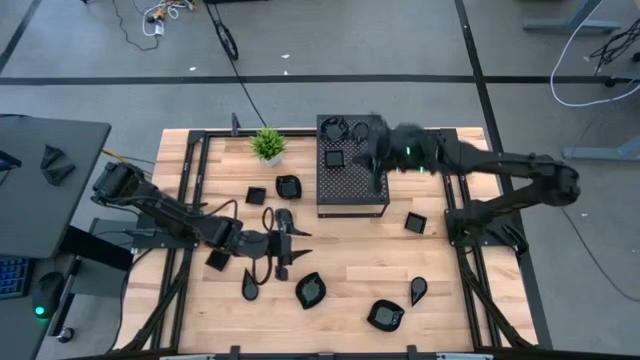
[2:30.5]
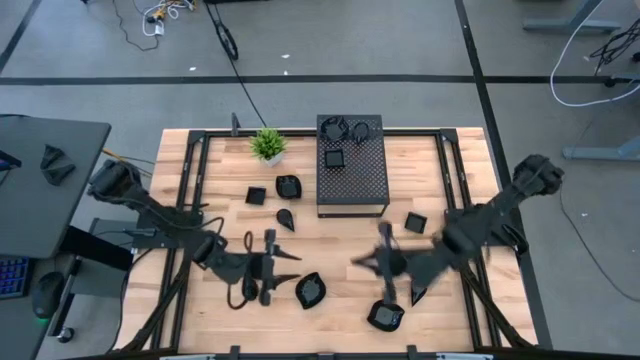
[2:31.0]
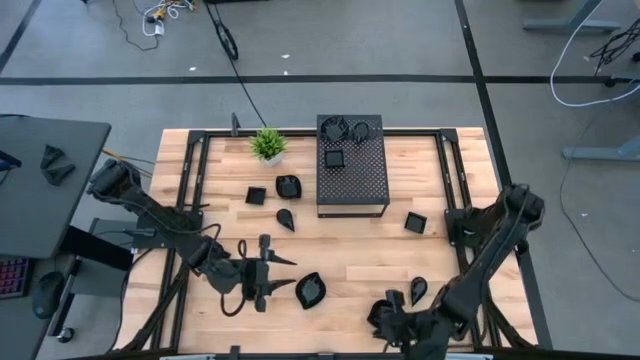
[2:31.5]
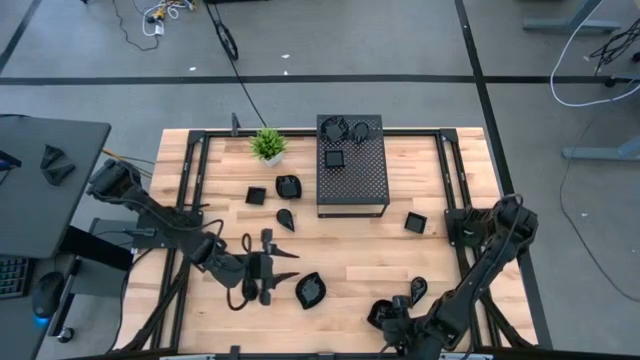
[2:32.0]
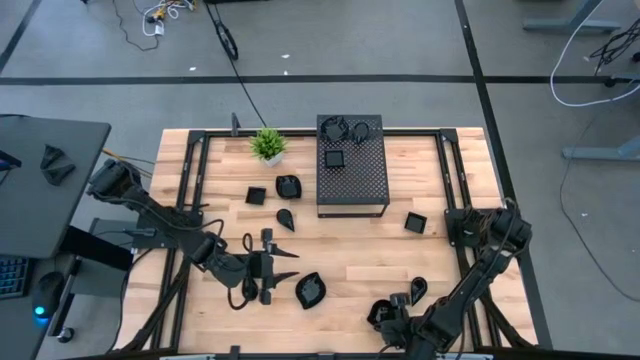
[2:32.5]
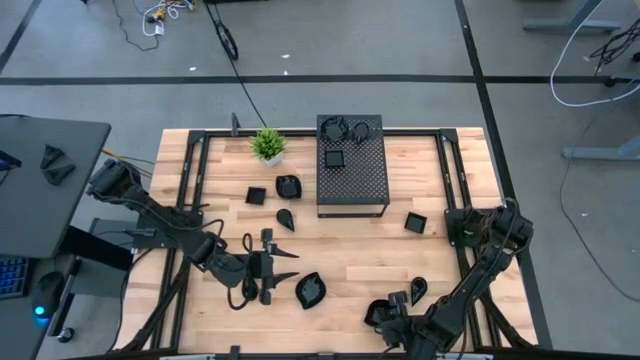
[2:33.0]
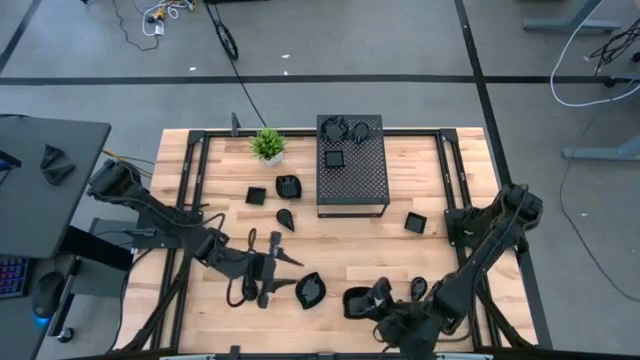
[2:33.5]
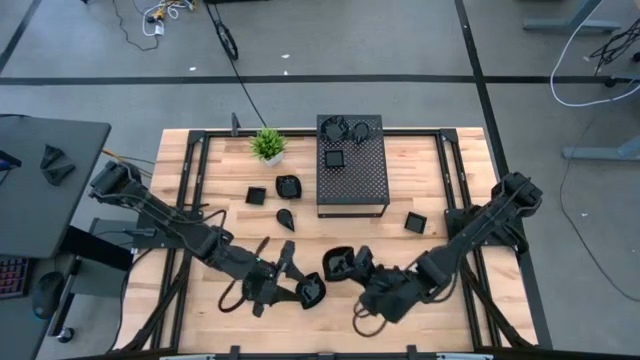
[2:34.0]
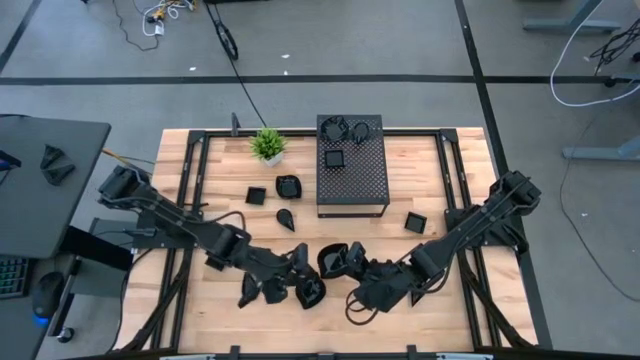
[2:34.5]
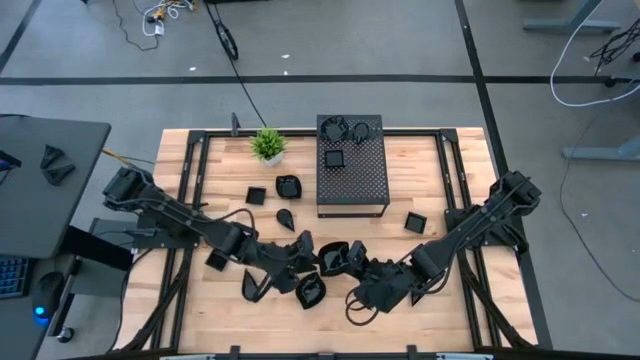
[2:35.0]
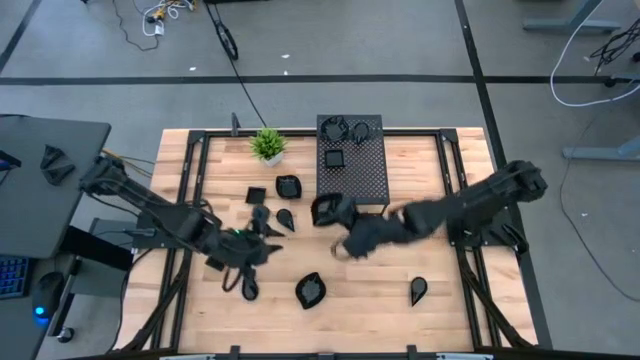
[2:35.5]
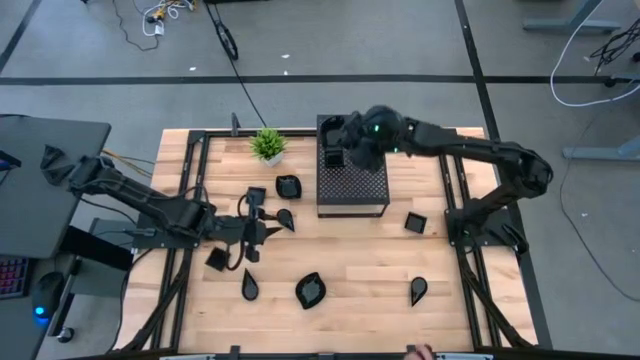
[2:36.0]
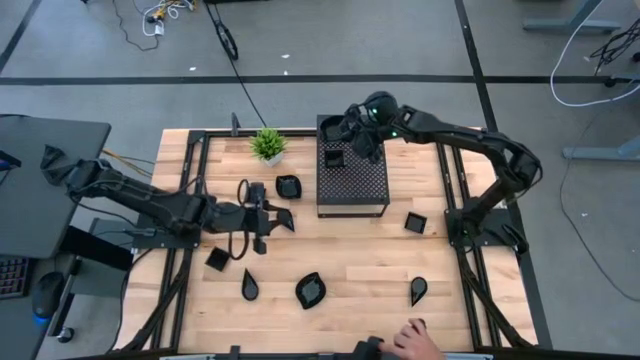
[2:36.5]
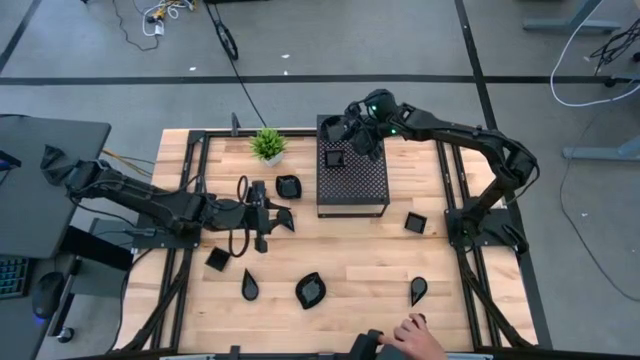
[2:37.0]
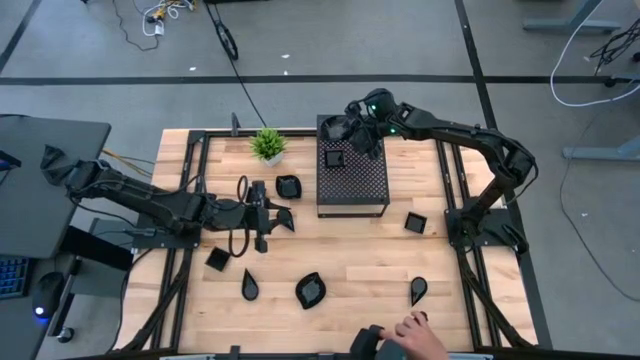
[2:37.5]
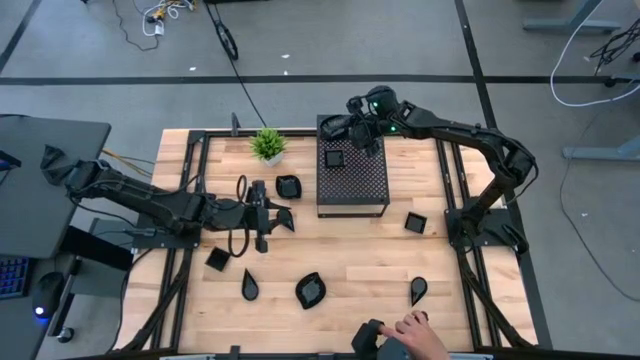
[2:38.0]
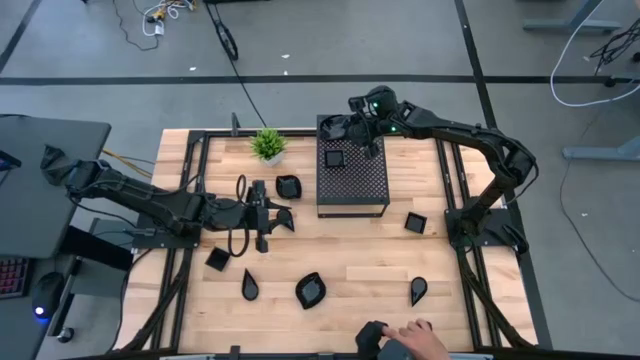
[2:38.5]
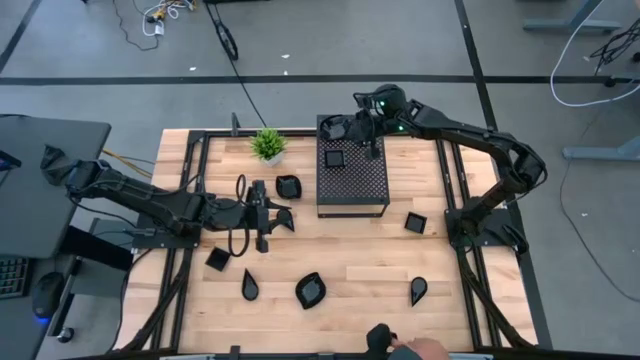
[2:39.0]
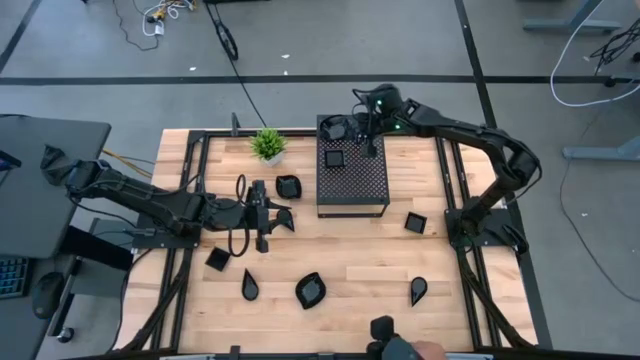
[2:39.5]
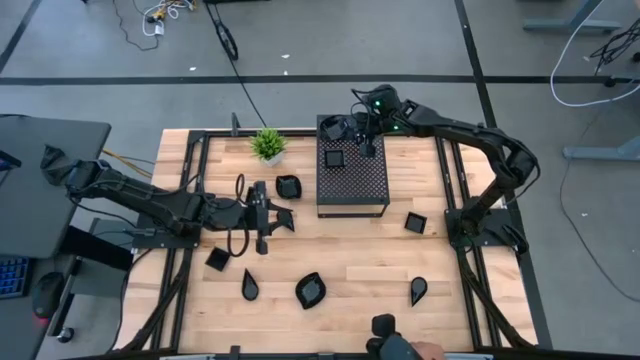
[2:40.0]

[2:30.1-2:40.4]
Task: Pick & Place Mini shaped plates
Stack the bottom right leaf shaped plate on top of the leaf shaped plates on the shelf

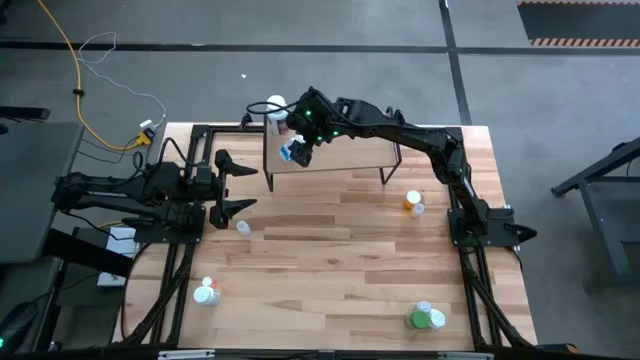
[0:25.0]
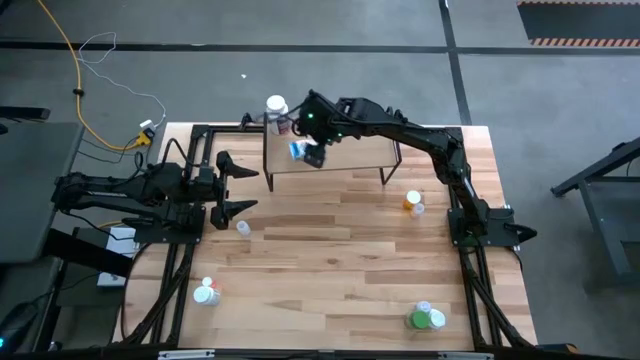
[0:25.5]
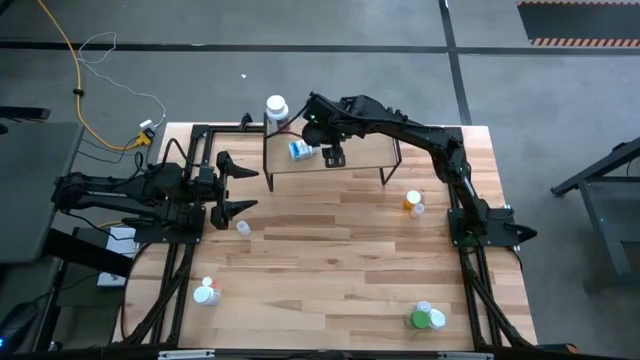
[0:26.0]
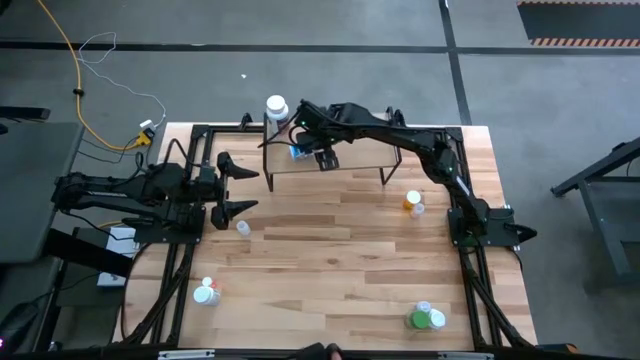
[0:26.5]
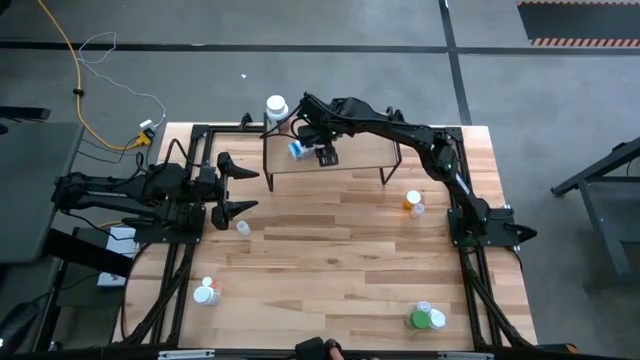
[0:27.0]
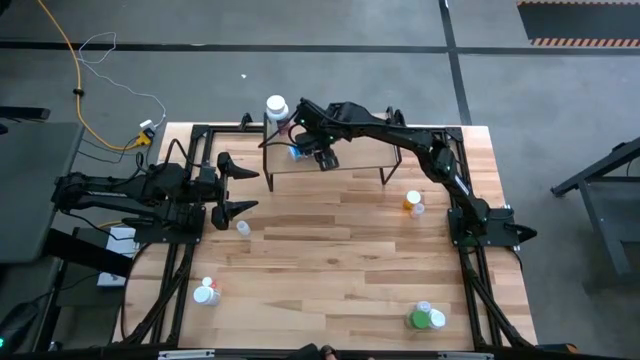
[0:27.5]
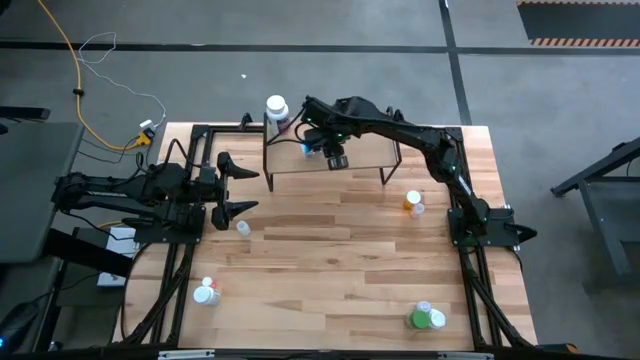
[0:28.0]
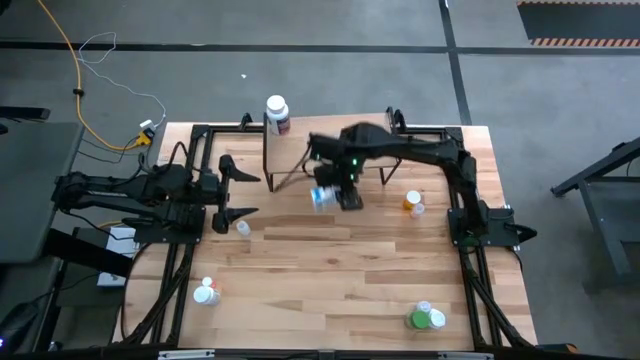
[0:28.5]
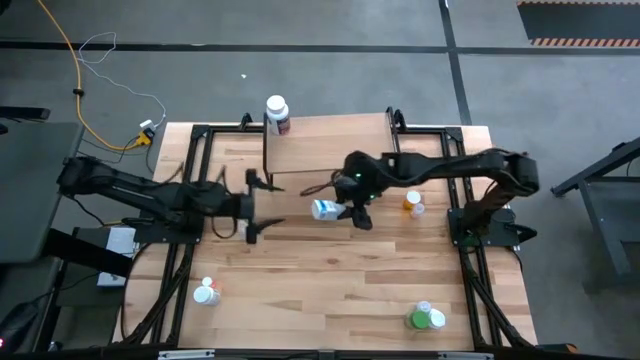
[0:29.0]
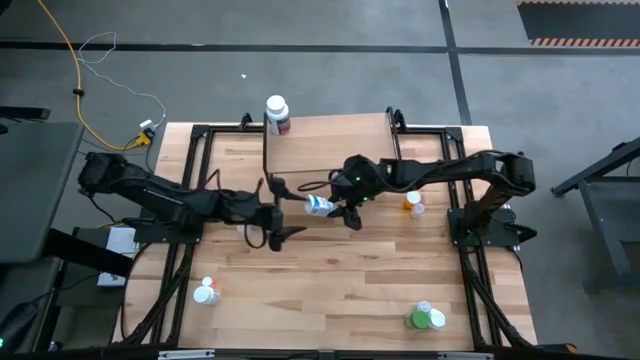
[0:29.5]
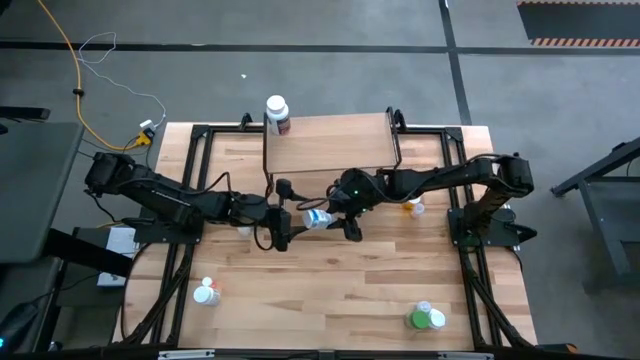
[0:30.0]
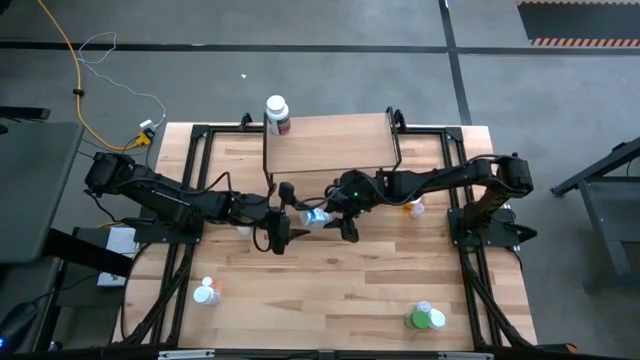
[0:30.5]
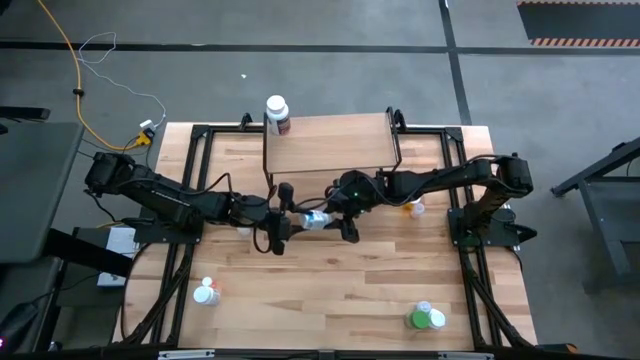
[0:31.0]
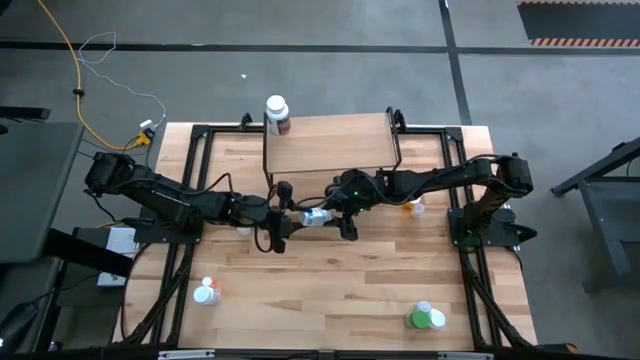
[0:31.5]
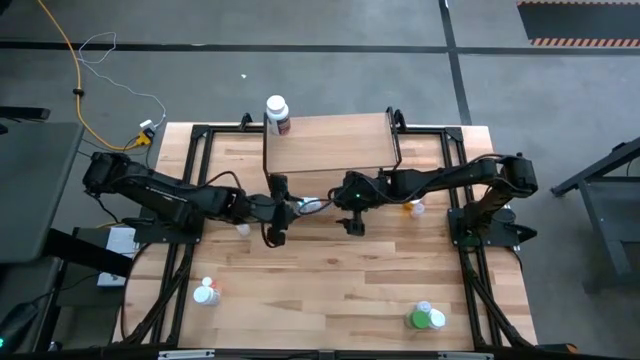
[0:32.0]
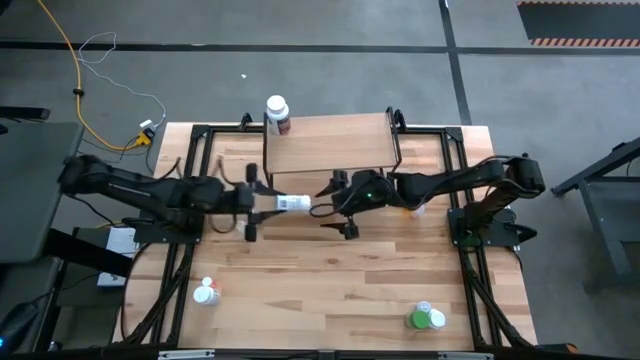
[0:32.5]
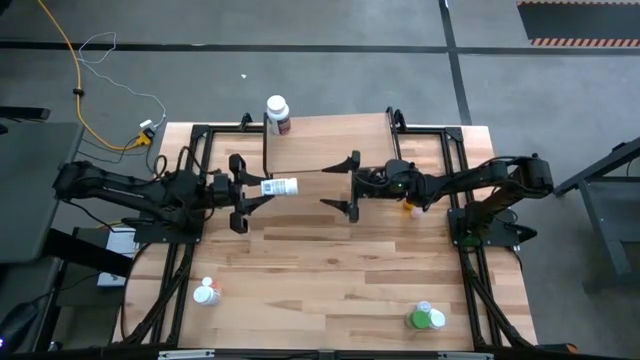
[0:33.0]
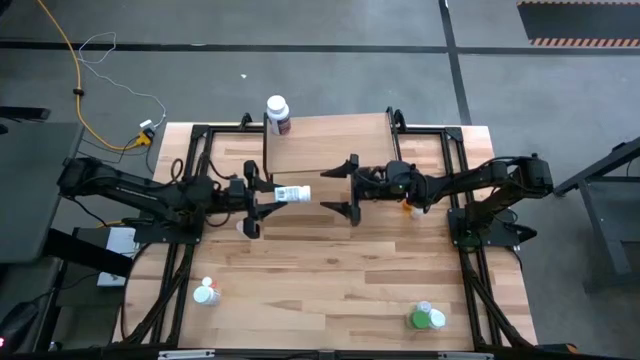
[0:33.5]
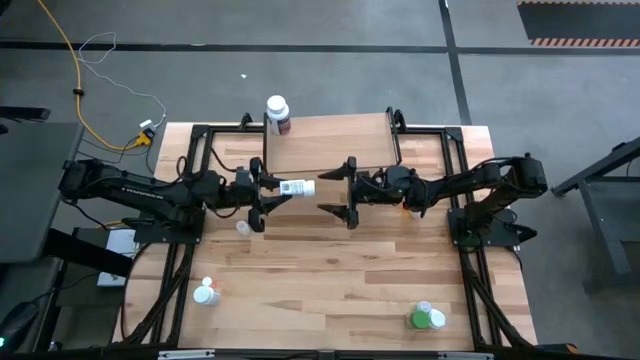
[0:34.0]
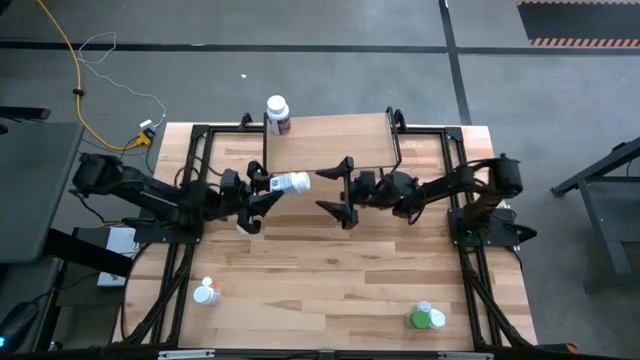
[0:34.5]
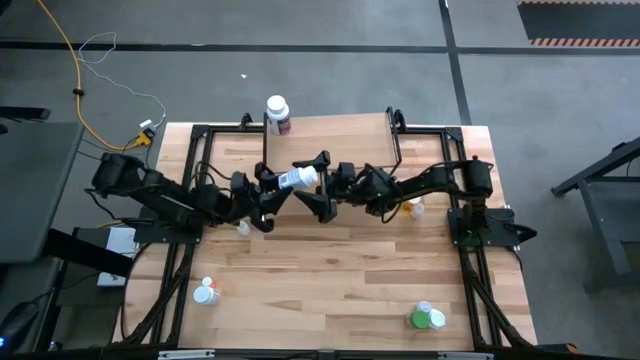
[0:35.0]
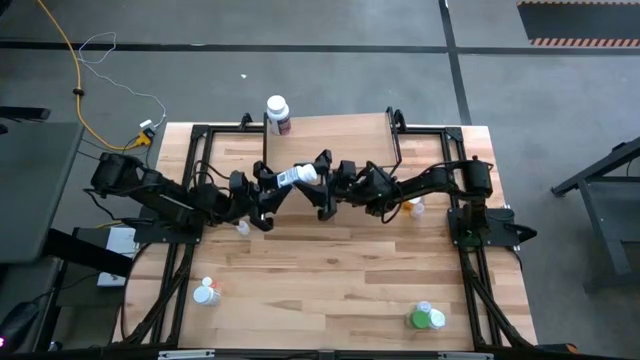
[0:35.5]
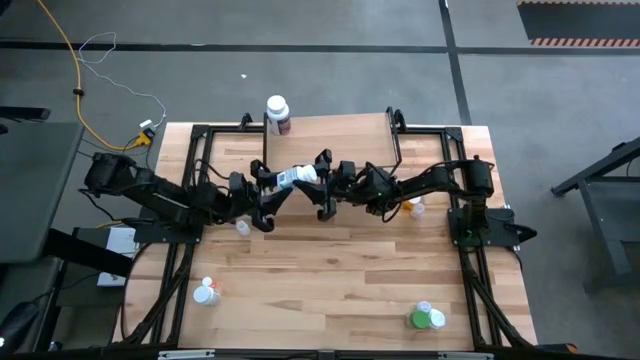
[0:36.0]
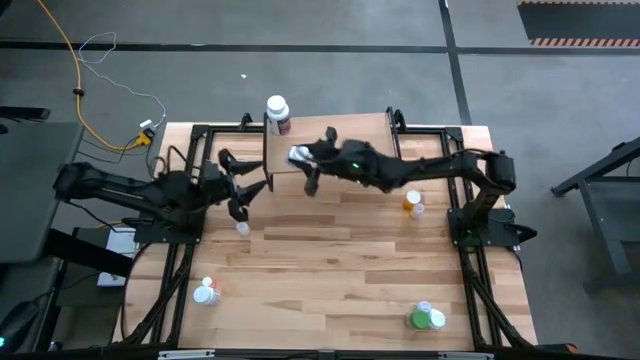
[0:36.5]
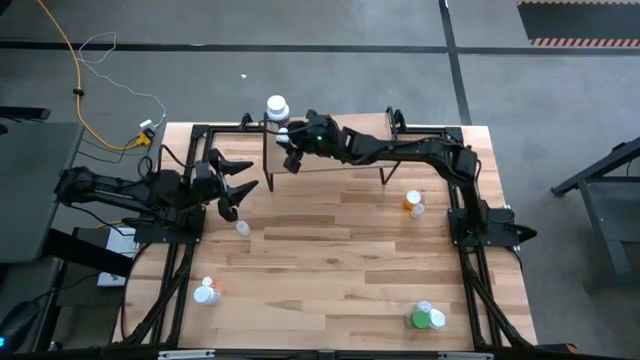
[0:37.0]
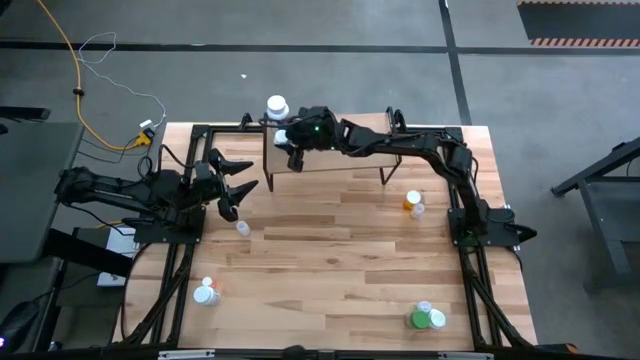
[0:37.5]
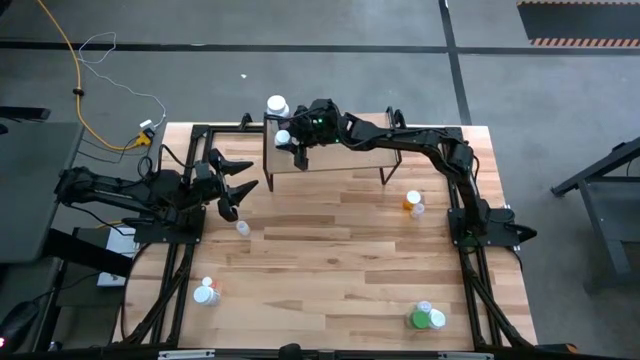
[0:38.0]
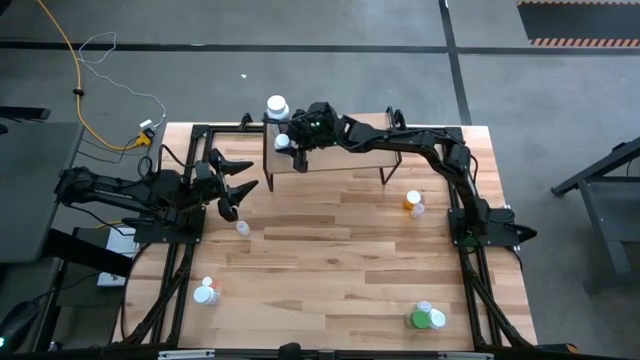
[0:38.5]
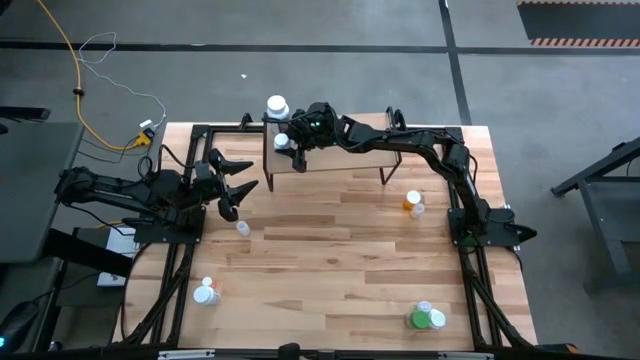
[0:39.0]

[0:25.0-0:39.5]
Task: Pick and place medicine bottles onto shelf by color
Put the top white blue pill bottle on the shelf
